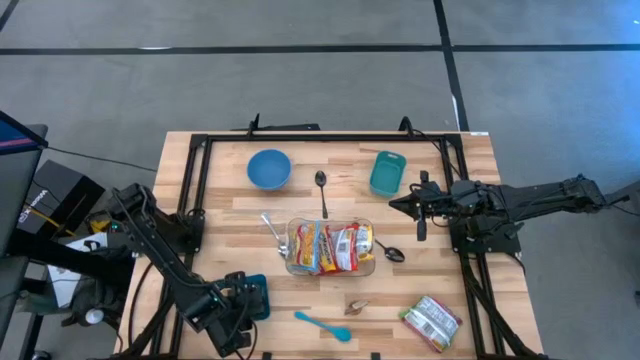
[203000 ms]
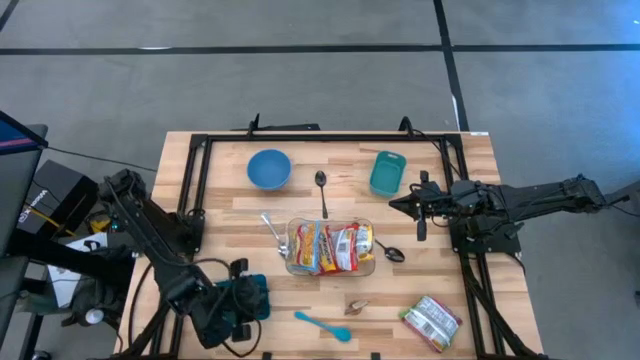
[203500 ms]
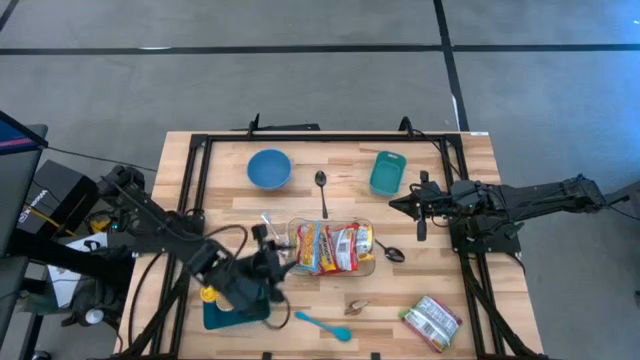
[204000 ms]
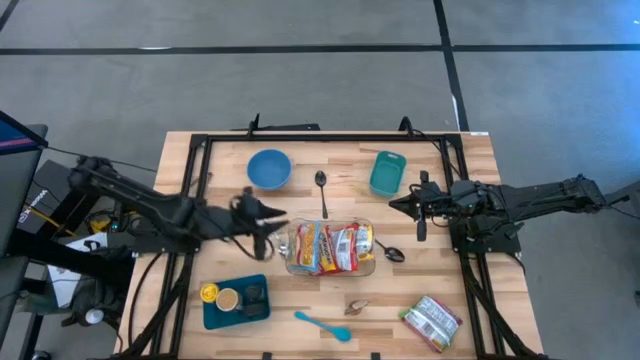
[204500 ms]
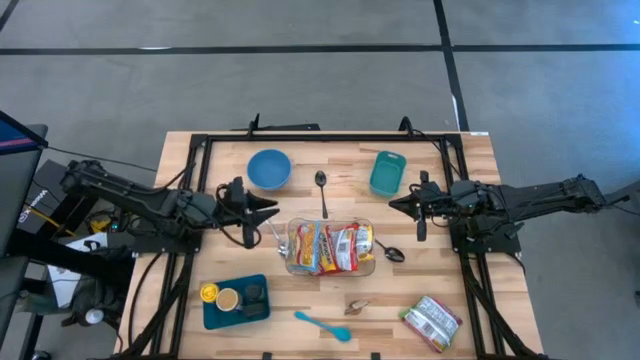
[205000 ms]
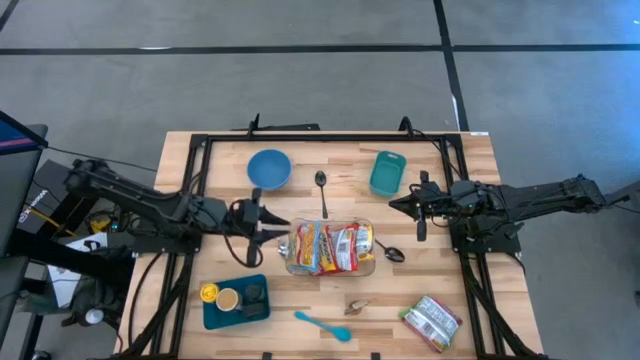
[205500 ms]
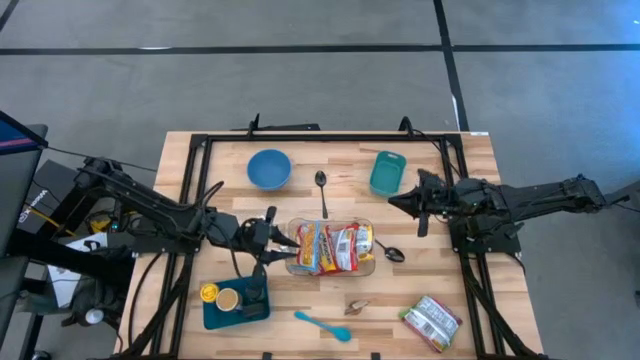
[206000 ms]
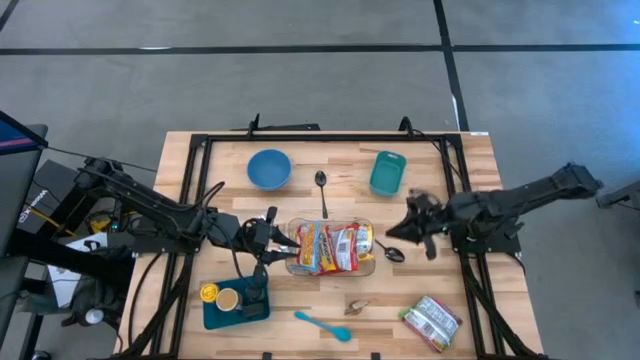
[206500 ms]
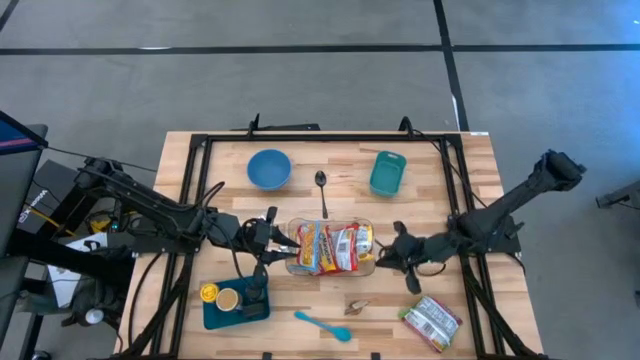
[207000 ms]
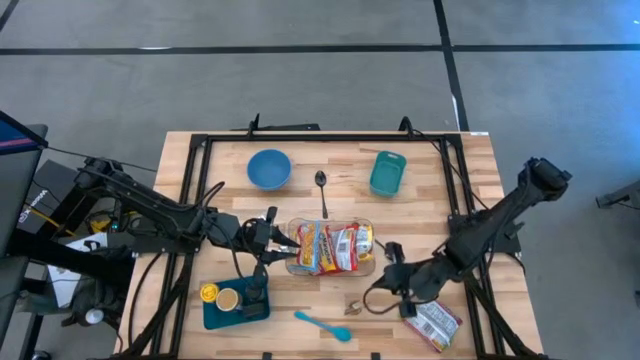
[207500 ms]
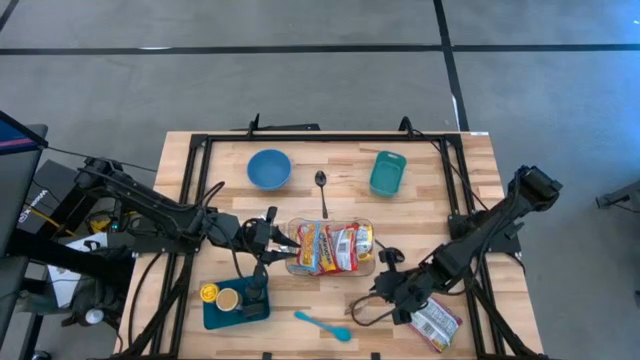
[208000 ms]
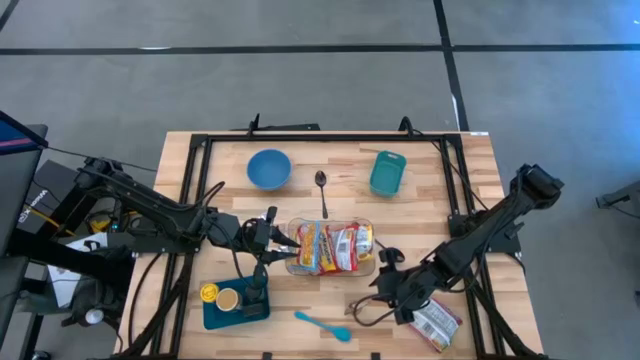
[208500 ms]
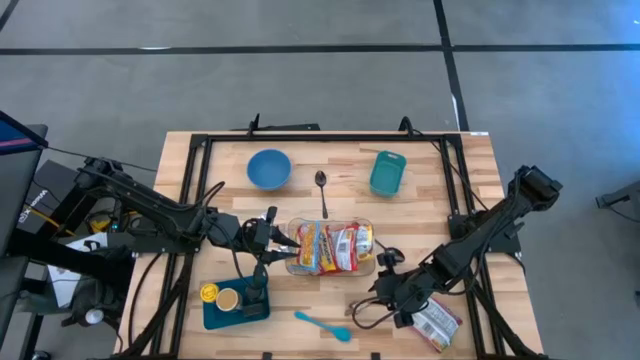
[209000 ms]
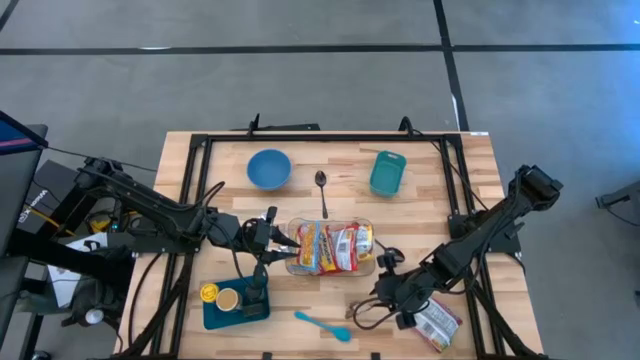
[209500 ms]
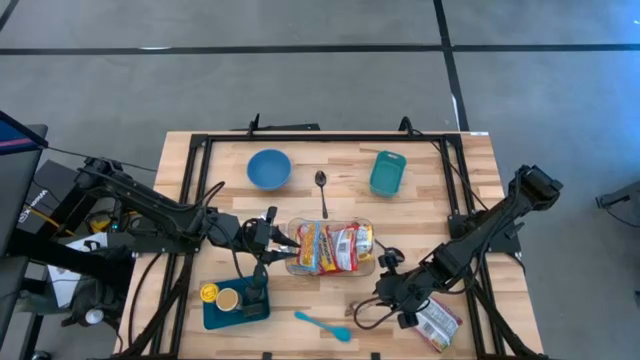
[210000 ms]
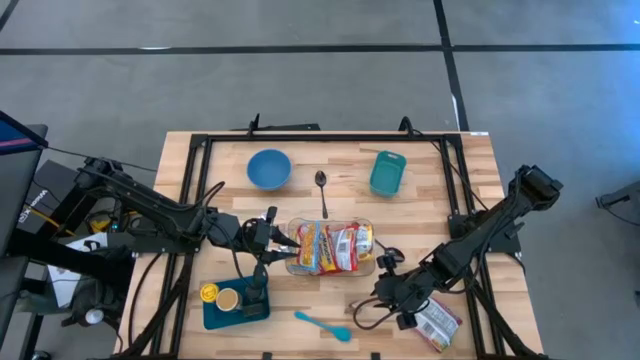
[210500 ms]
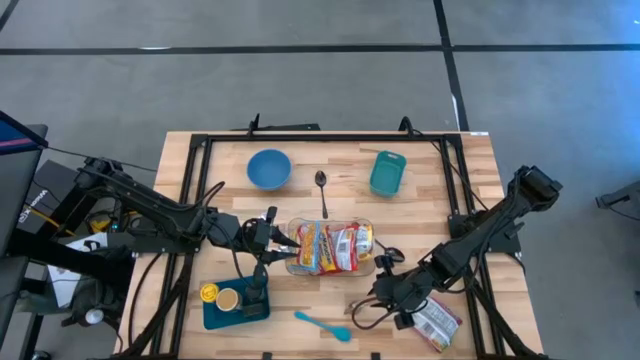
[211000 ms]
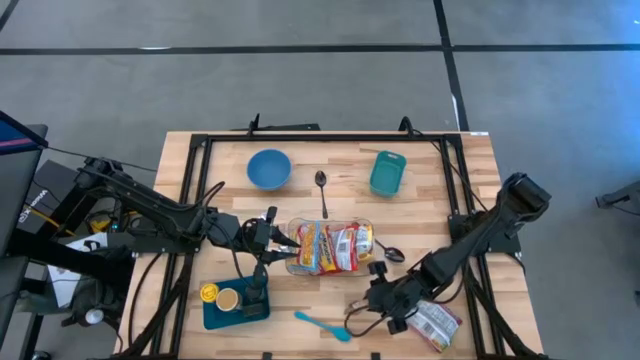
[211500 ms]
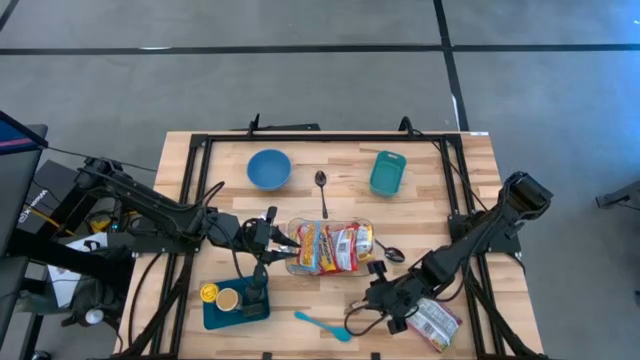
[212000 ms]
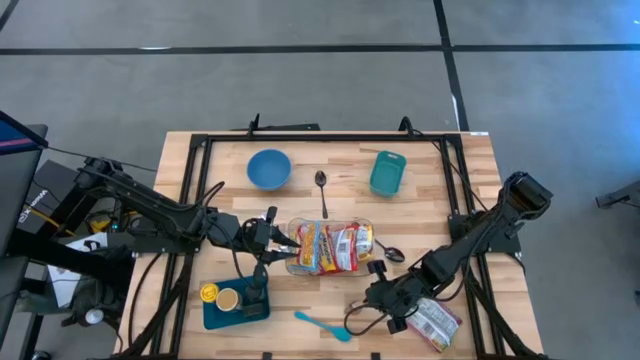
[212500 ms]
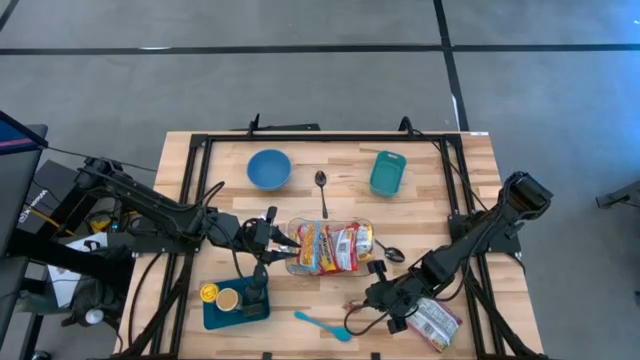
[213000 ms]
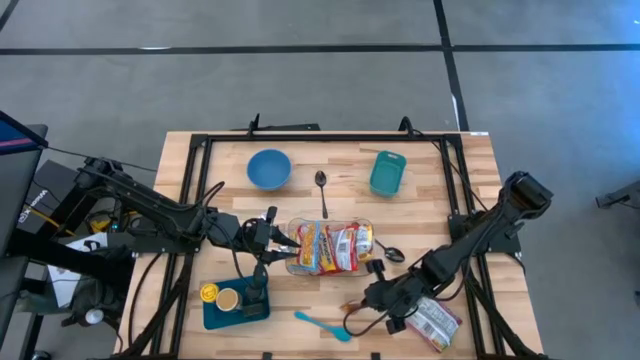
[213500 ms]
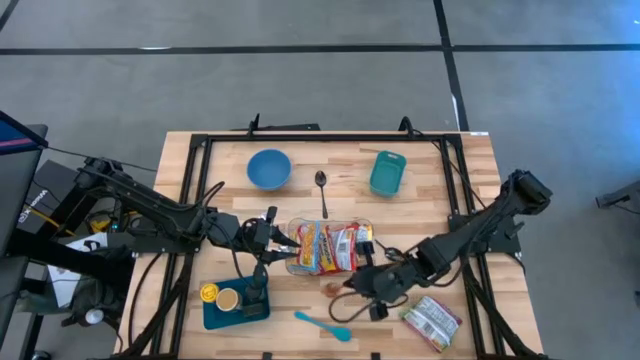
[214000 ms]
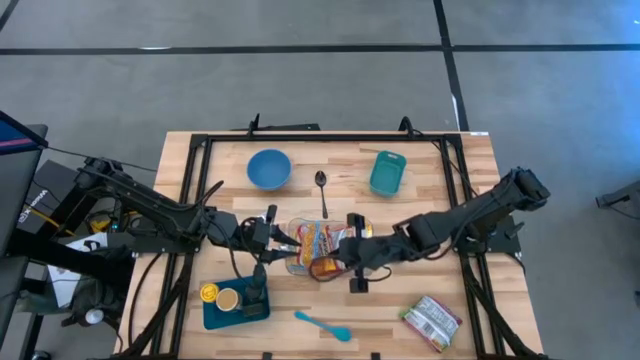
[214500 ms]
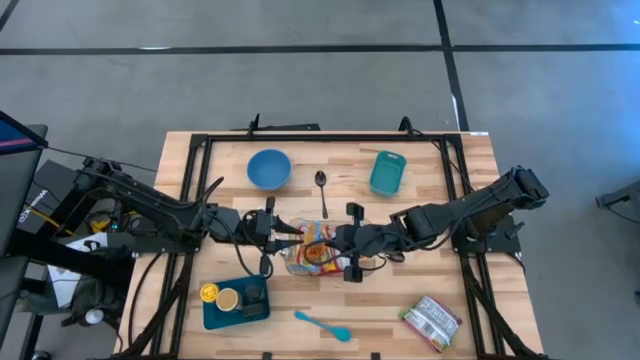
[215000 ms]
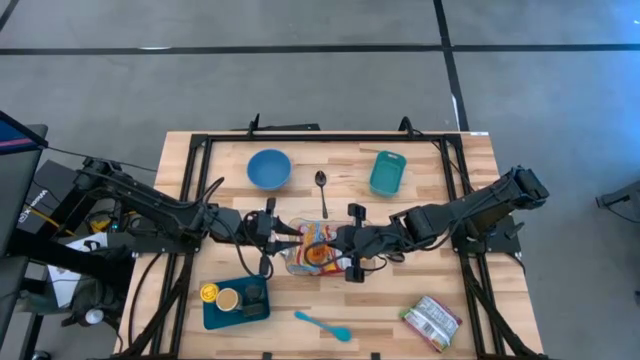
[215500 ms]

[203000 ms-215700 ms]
Task: Pick & Place Food Item
Put the orange spice bag into the dark blue bin

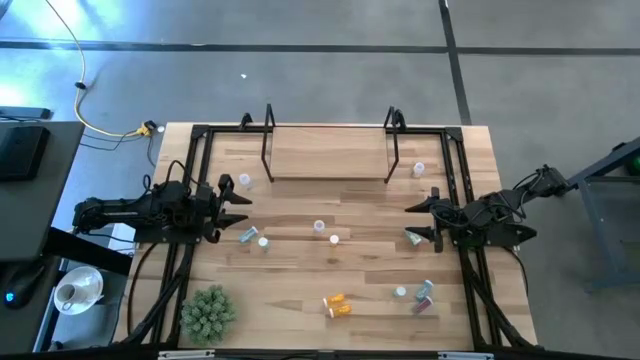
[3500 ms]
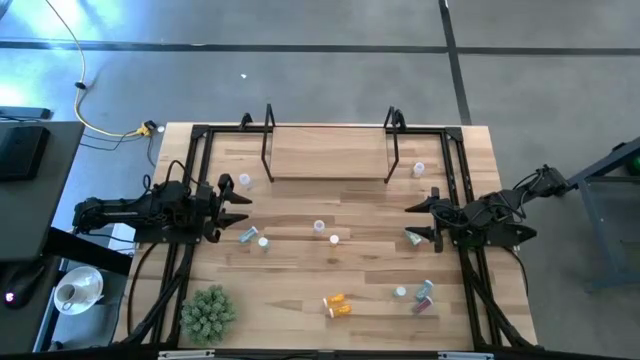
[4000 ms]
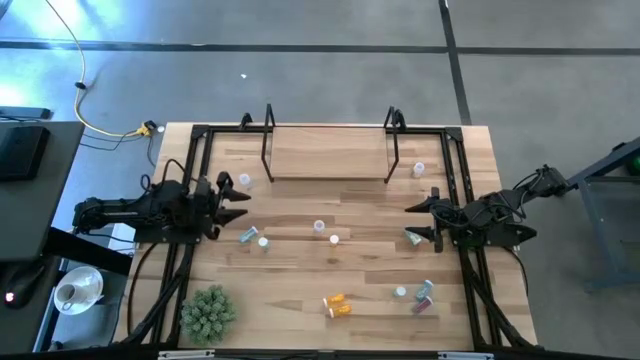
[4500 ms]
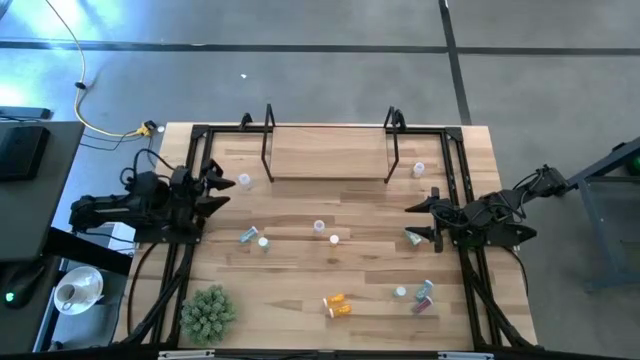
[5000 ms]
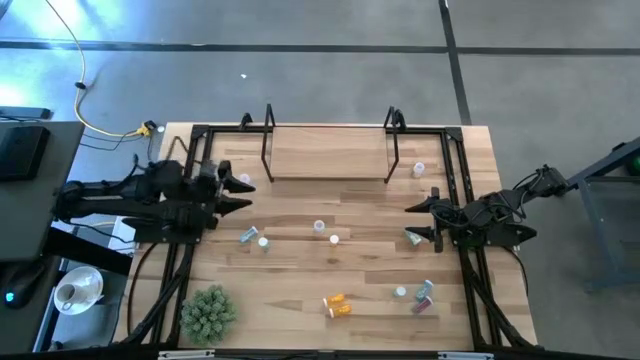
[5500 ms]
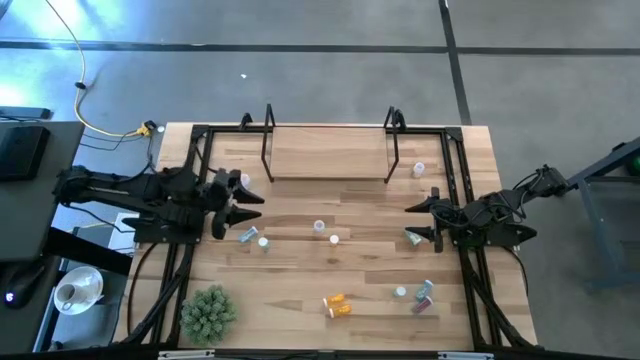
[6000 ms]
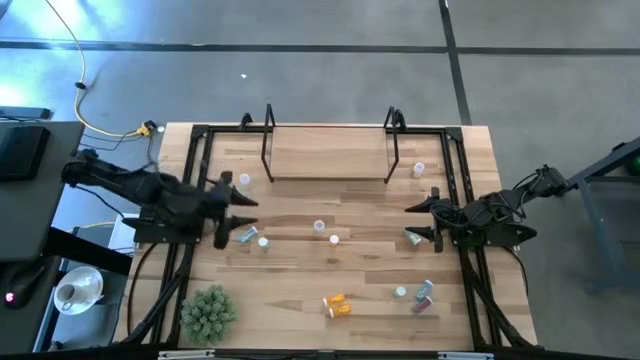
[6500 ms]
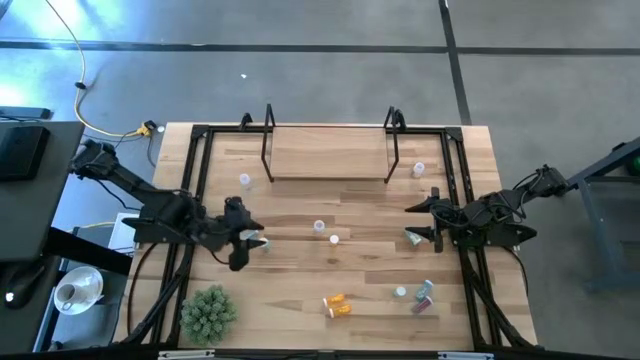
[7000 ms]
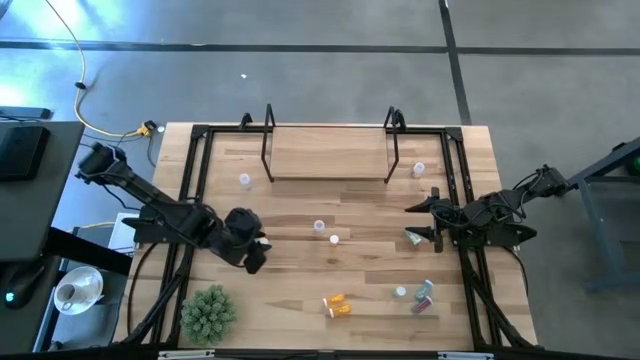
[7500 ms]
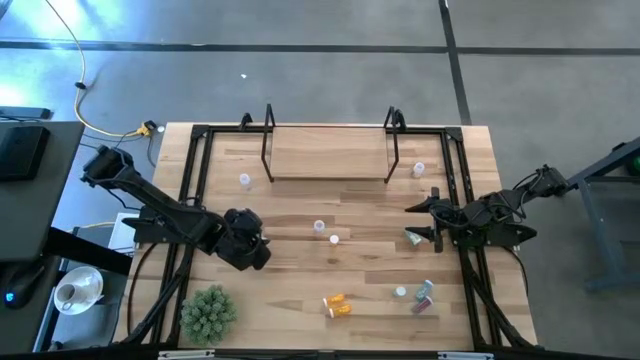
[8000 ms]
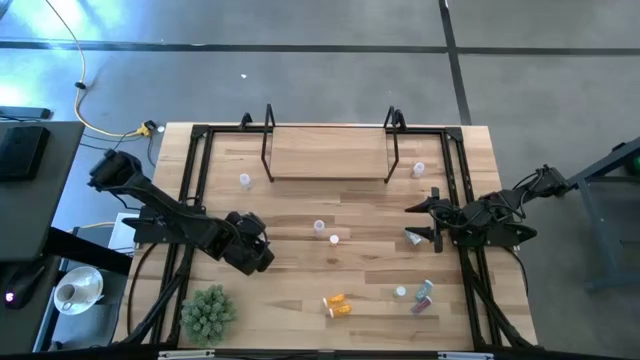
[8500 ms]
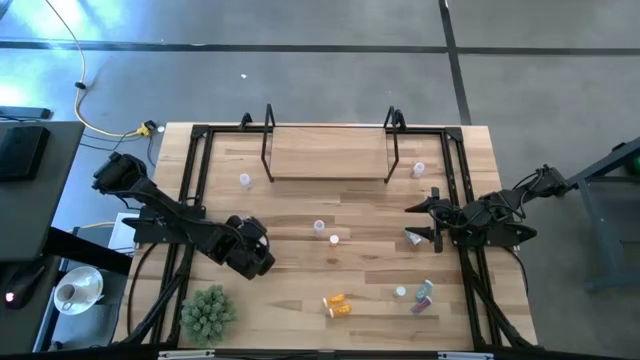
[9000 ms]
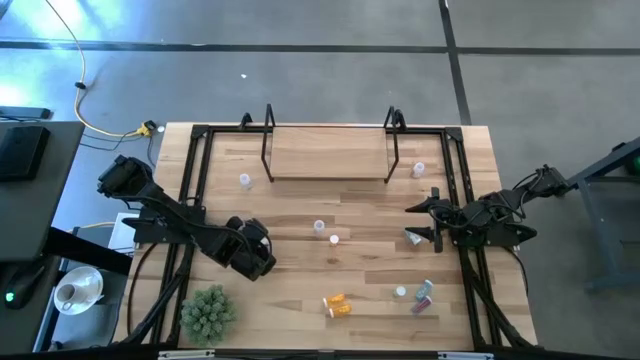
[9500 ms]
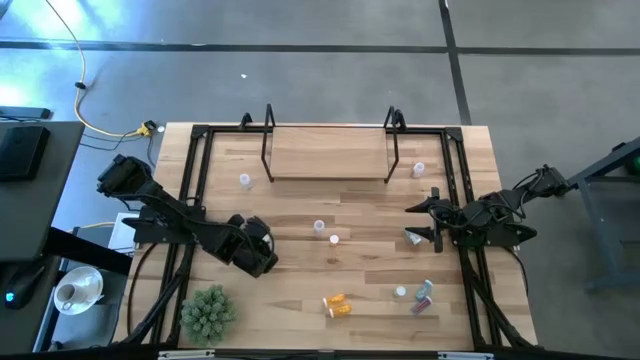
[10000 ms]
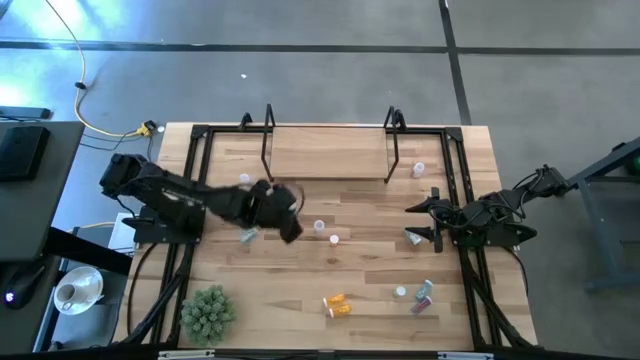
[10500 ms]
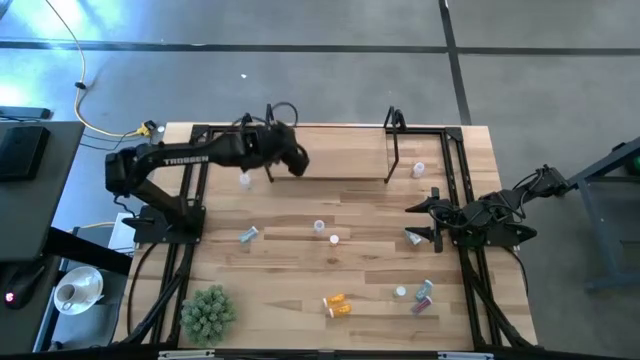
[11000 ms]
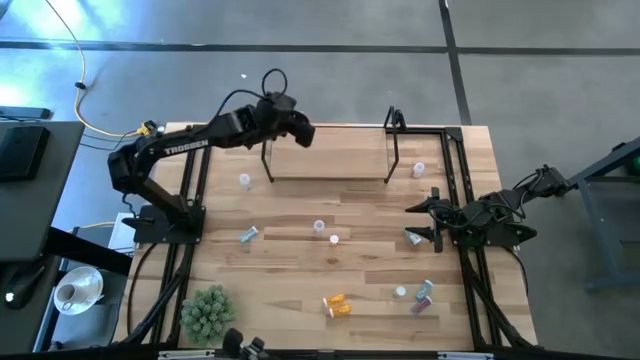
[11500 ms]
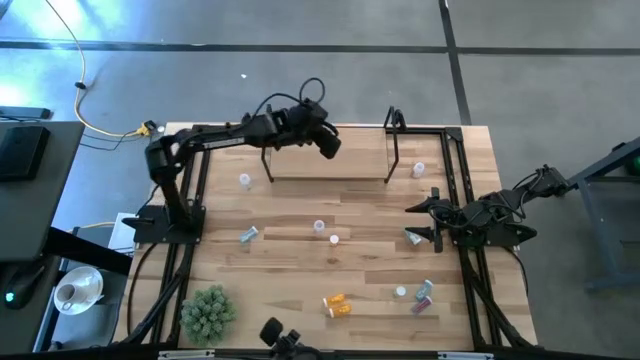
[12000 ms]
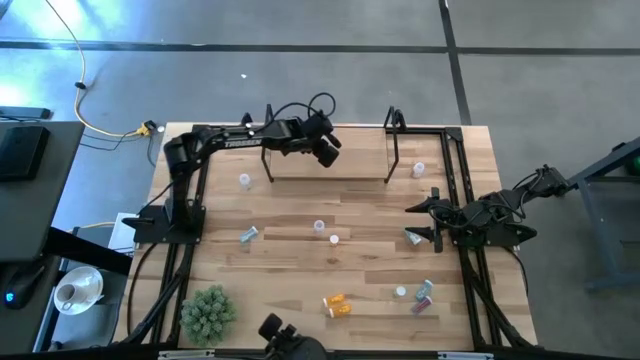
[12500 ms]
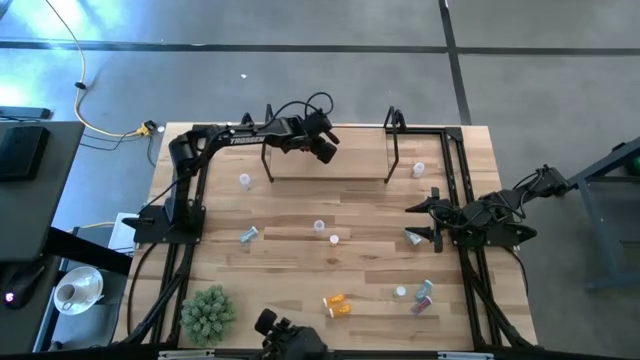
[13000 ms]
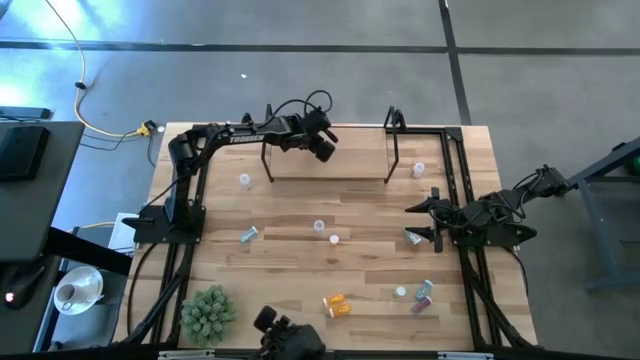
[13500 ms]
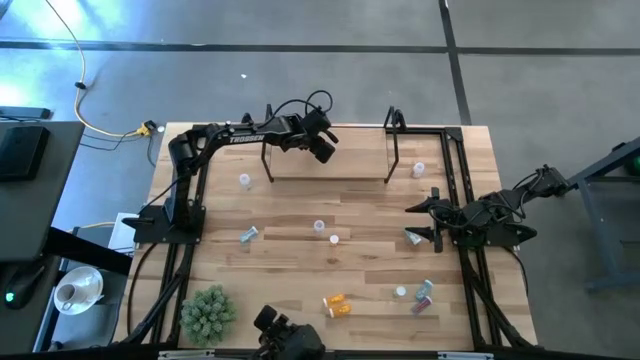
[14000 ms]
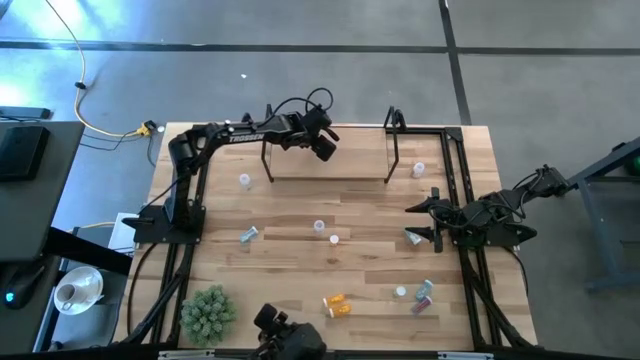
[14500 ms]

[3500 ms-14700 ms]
Task: Pick and place medicine bottles onto shelf by color
Put the top left green pill bottle on the shelf
